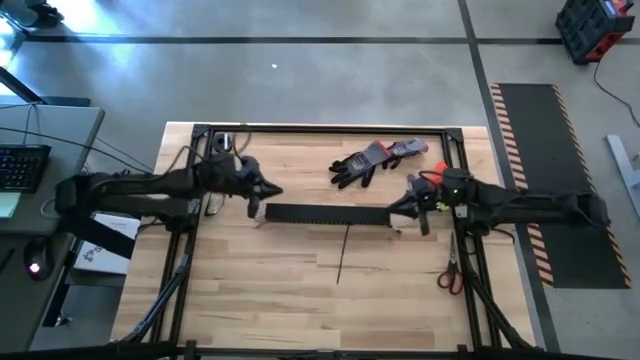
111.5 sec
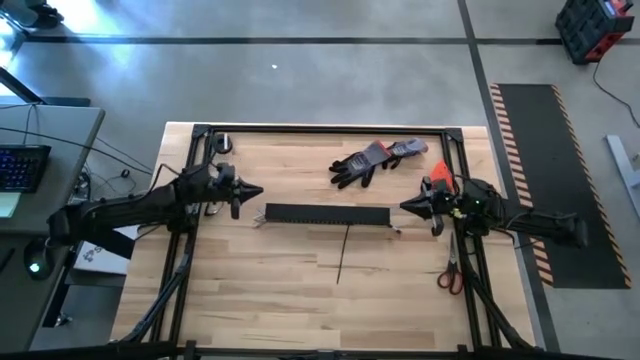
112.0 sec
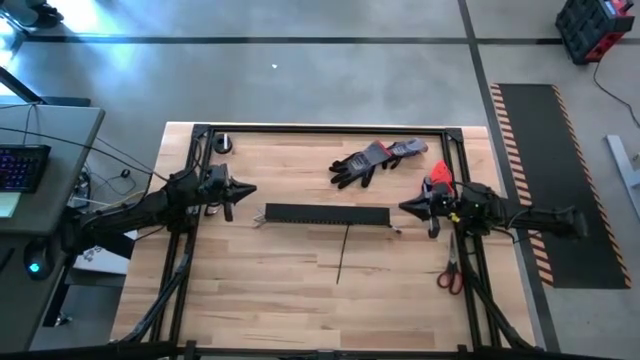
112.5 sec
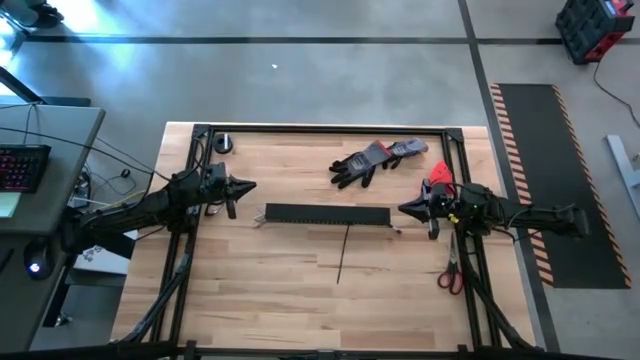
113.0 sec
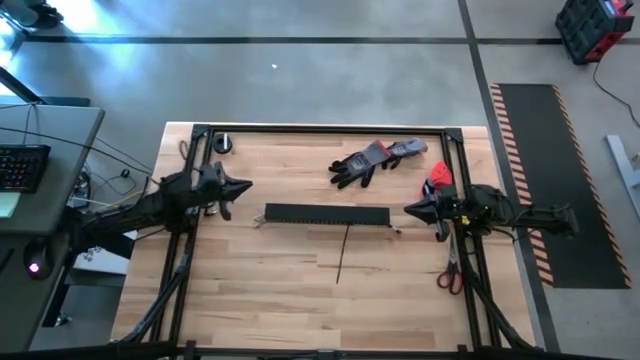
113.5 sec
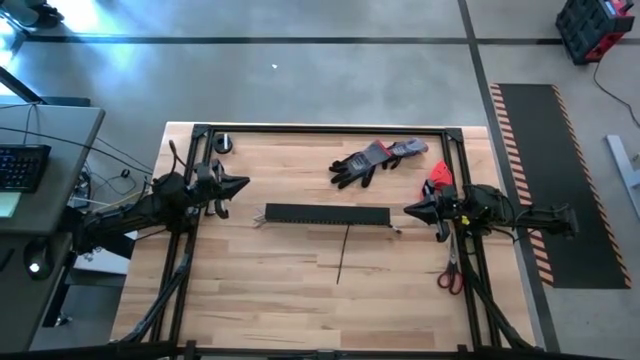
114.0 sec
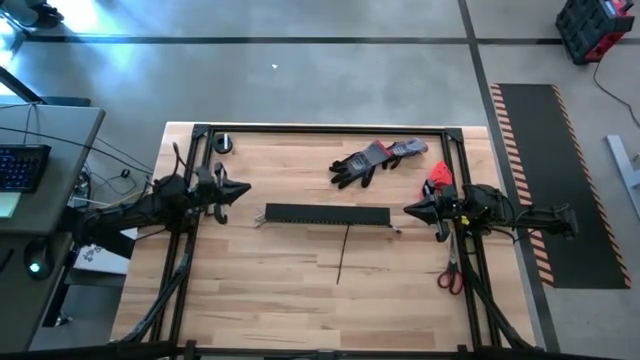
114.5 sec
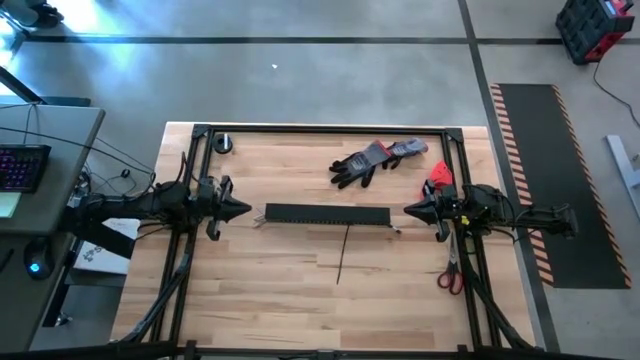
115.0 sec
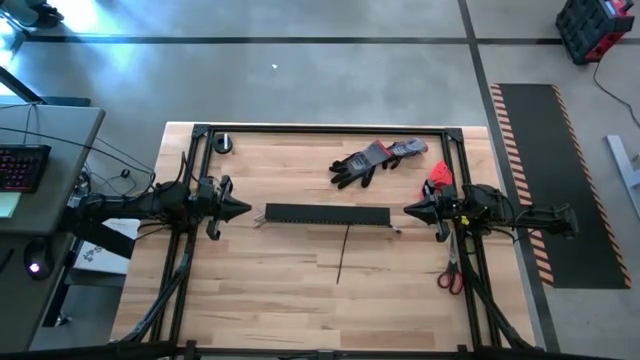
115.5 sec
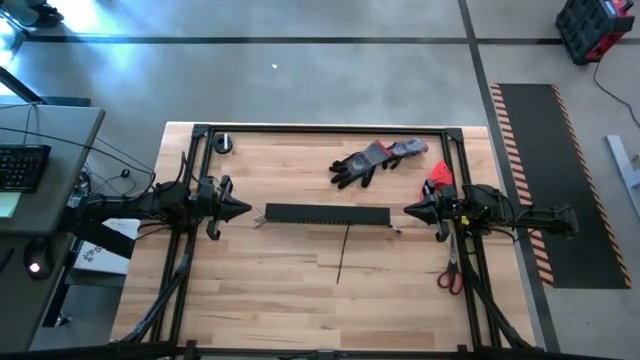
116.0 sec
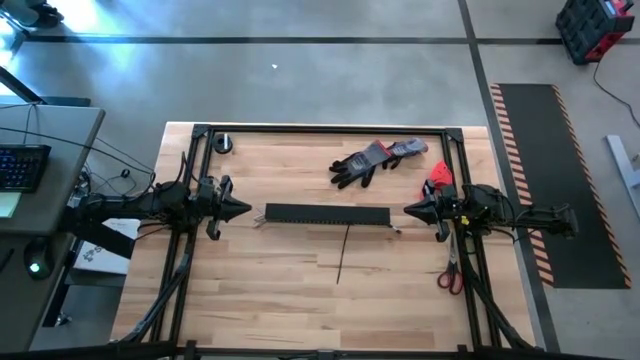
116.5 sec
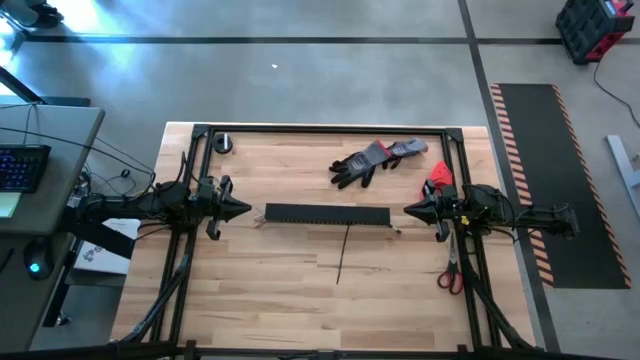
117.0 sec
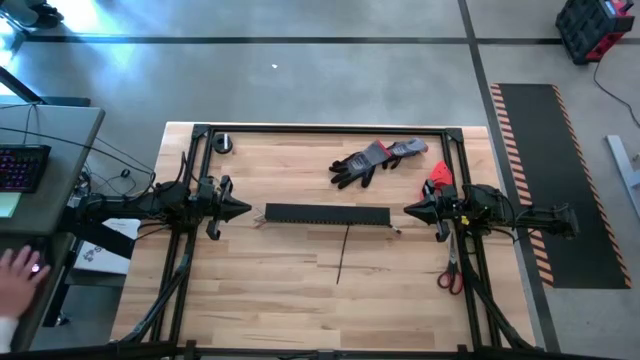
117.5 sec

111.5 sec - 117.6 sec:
Task: Ziptie cables
Return to Home Position

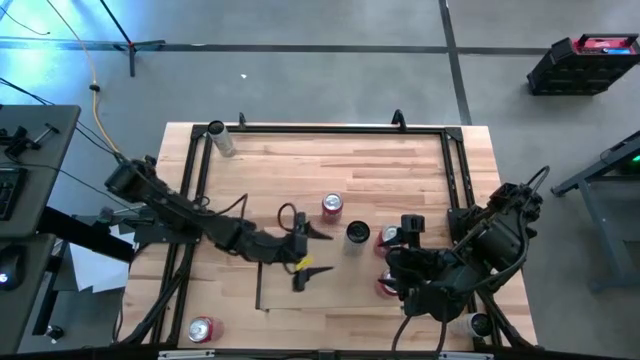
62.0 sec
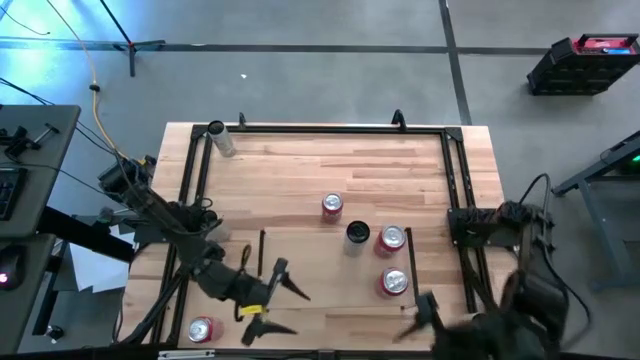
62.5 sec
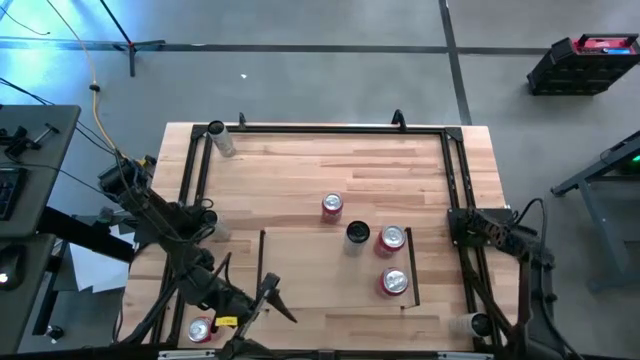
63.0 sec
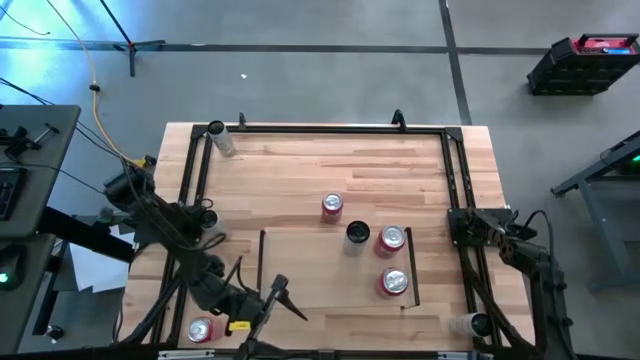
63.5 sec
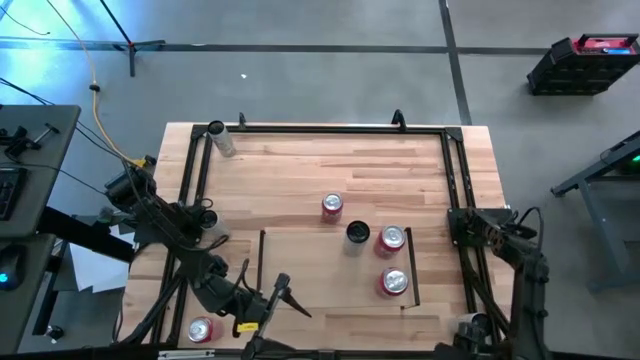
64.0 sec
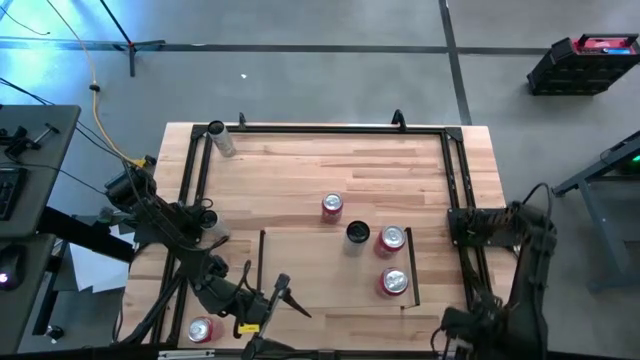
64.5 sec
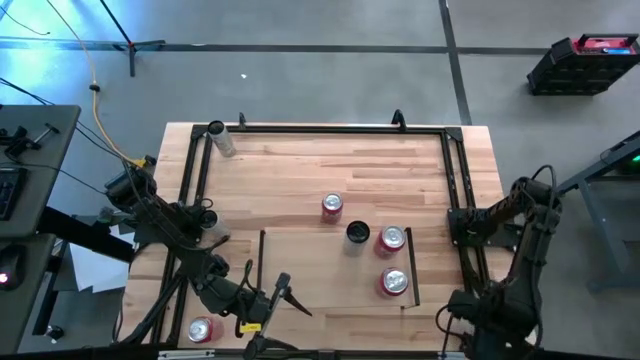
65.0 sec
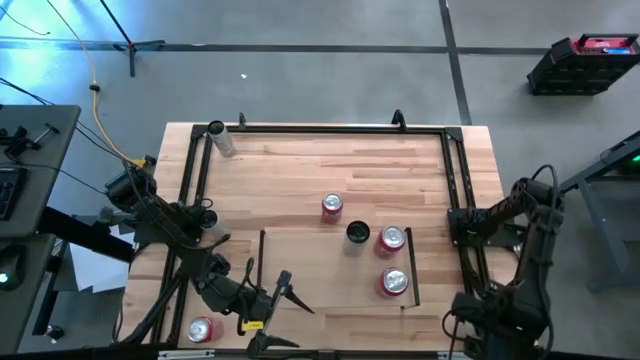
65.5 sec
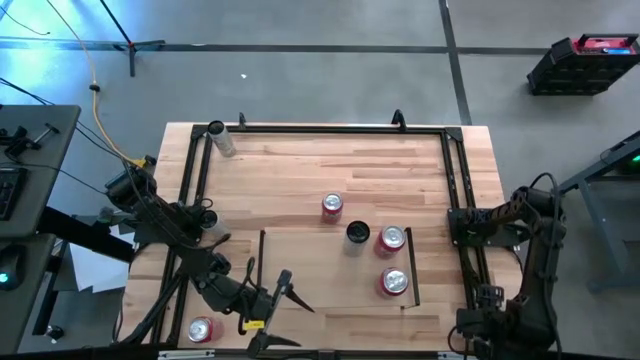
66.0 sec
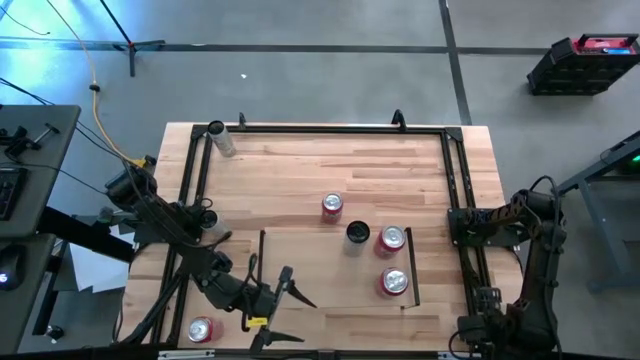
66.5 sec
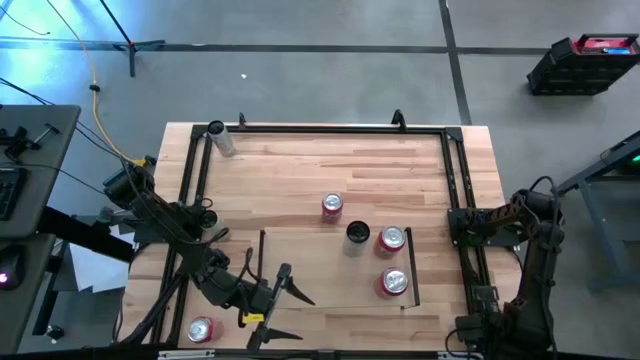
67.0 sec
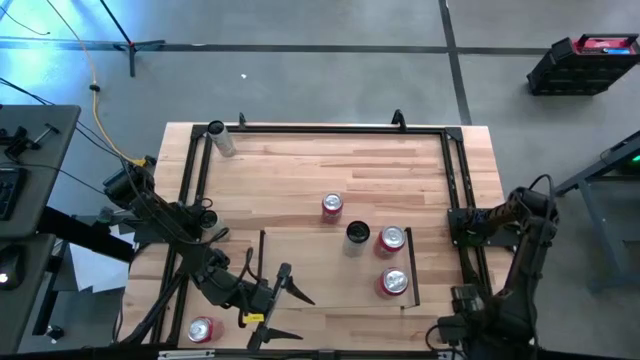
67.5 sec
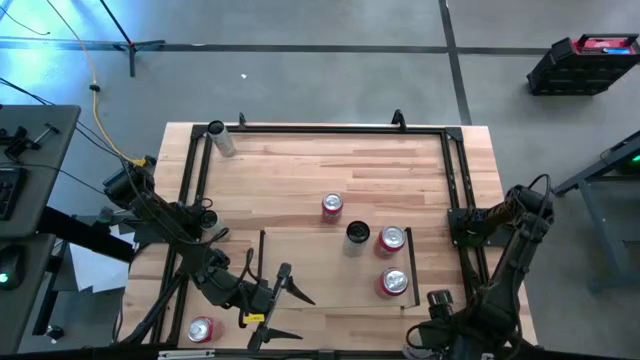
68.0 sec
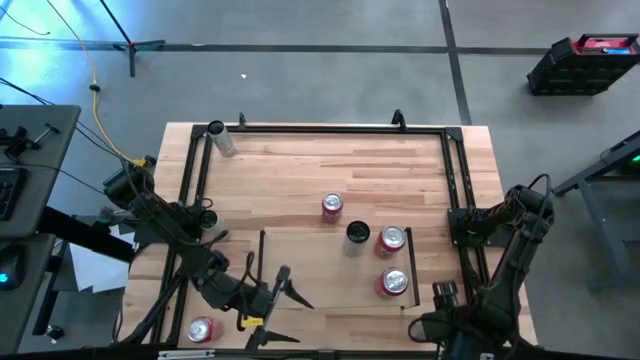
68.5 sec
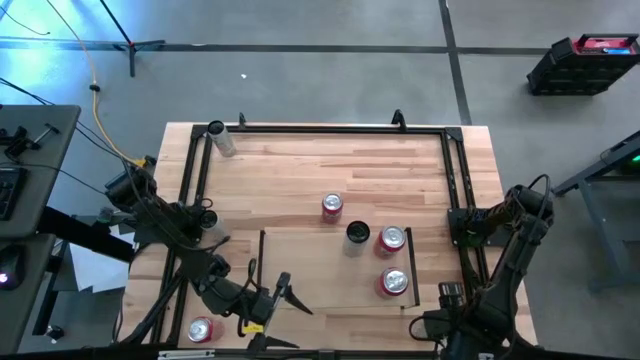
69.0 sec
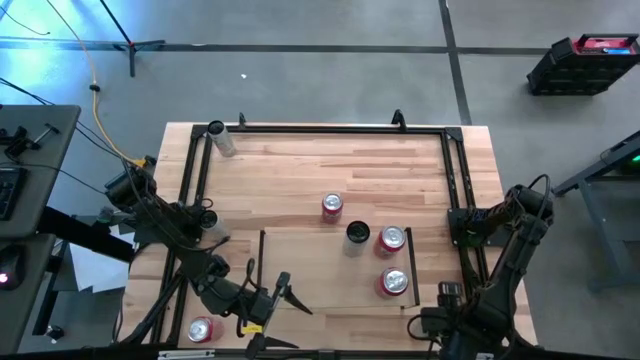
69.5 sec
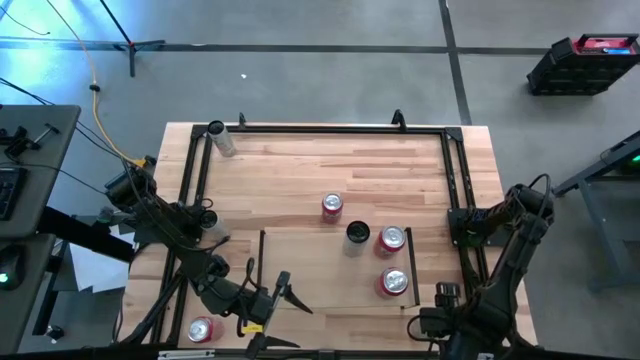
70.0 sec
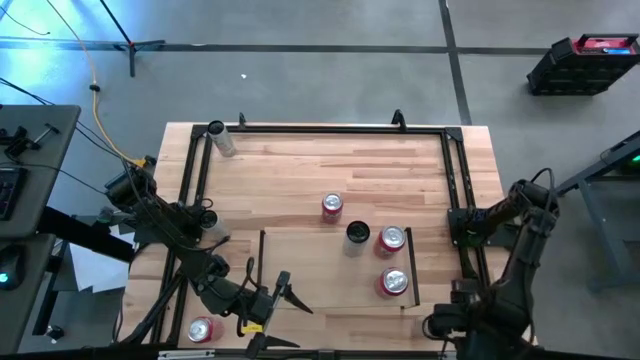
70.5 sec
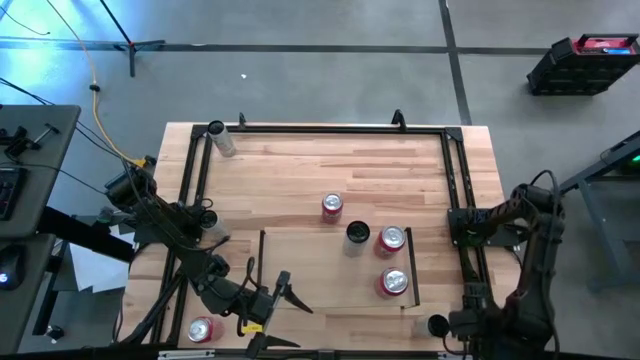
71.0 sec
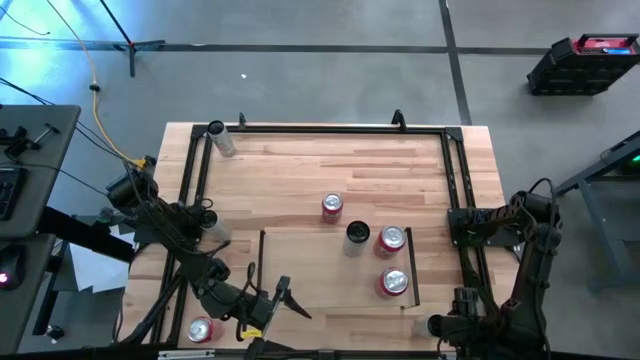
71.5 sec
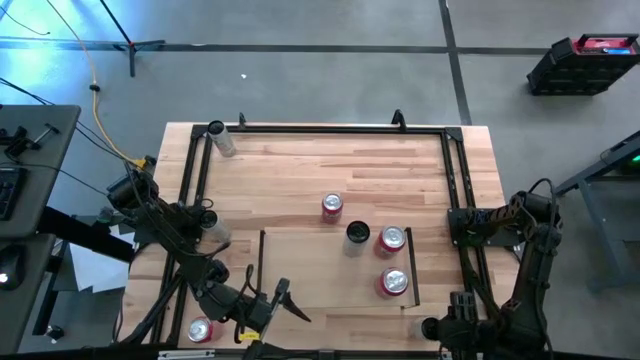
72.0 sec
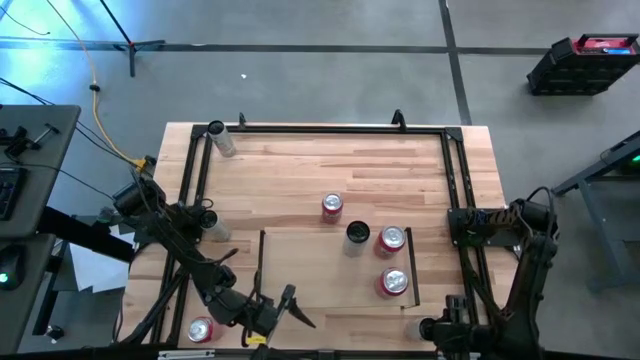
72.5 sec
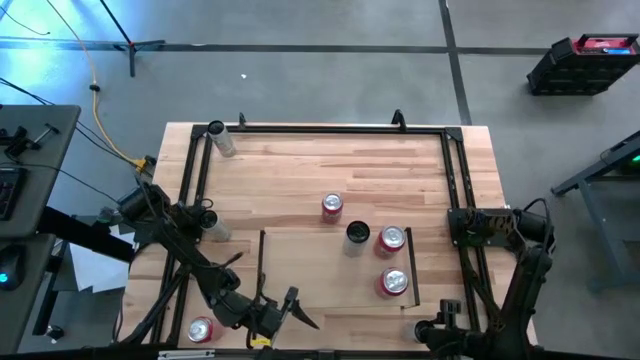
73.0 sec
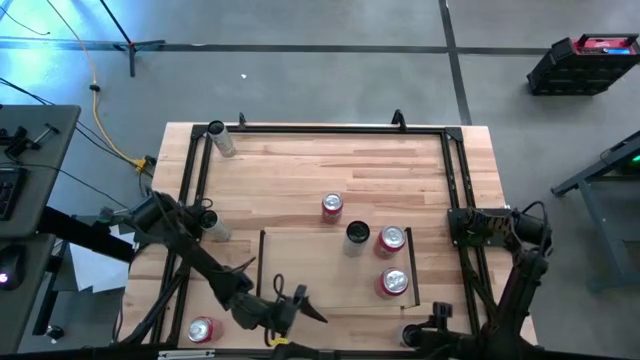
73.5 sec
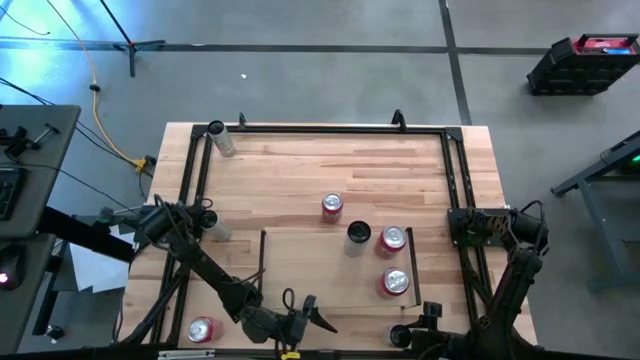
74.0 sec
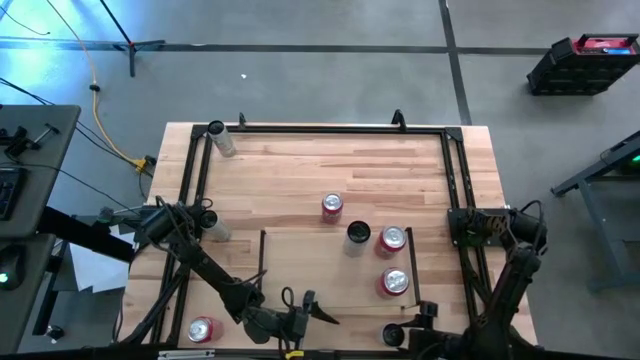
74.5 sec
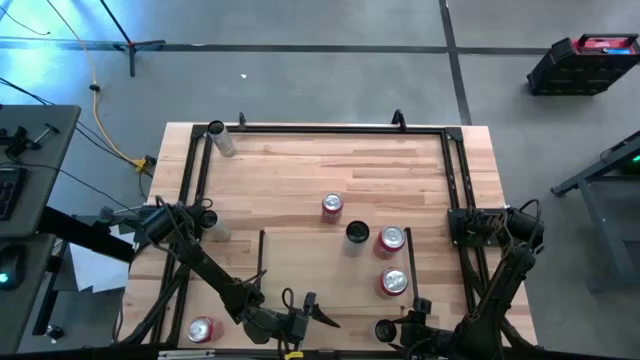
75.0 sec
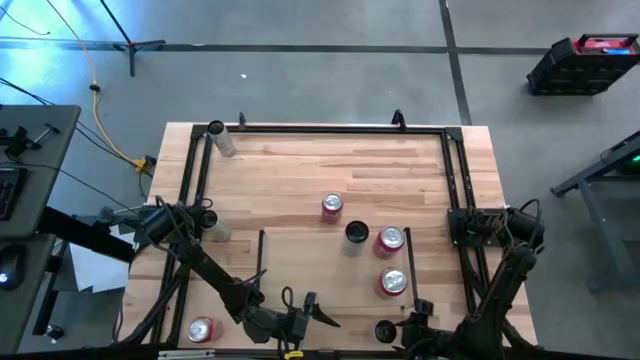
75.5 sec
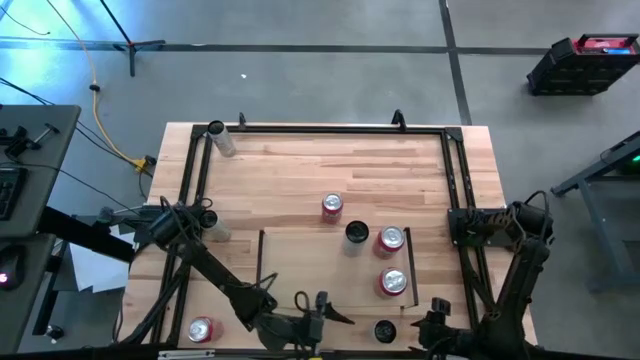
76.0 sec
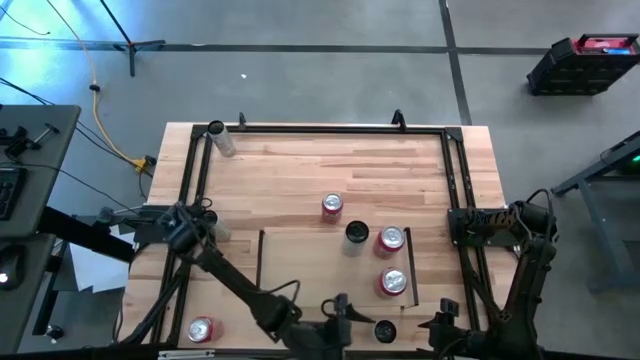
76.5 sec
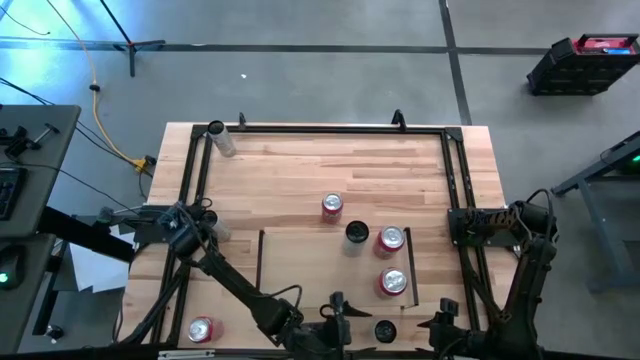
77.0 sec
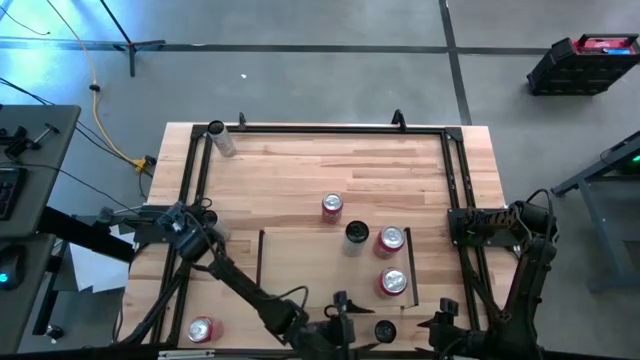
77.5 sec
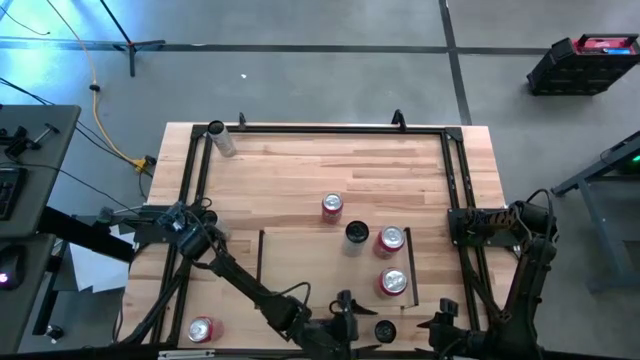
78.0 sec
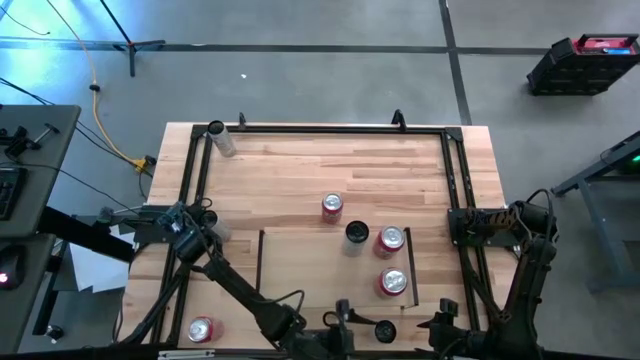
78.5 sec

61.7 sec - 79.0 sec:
Task: Place canned beverage on shelf
Put the bottom white yellow soda can on the shelf aligned with the white yellow soda can
